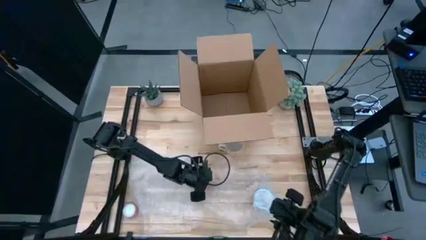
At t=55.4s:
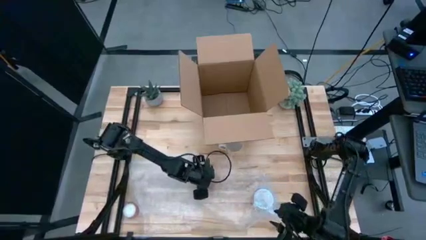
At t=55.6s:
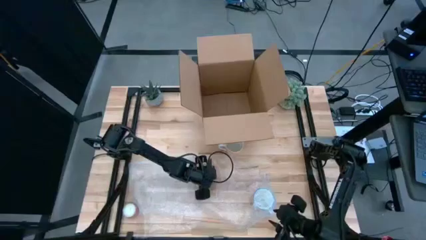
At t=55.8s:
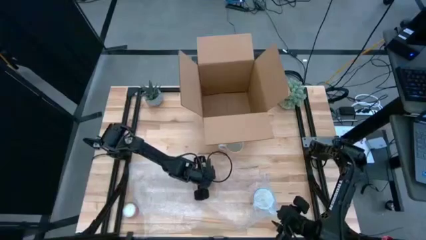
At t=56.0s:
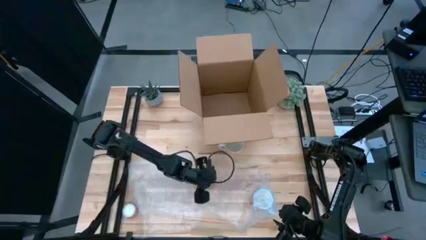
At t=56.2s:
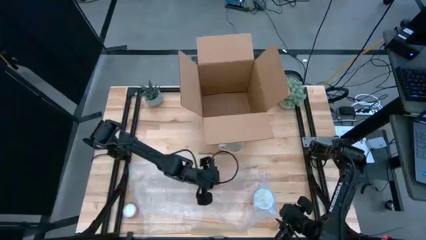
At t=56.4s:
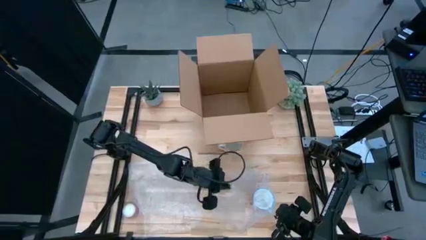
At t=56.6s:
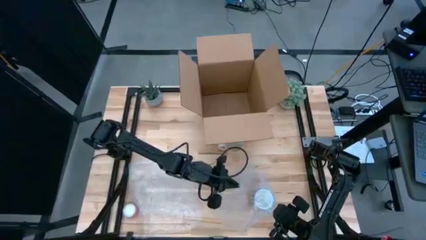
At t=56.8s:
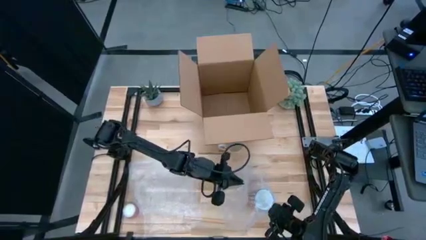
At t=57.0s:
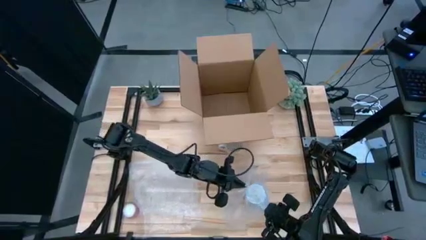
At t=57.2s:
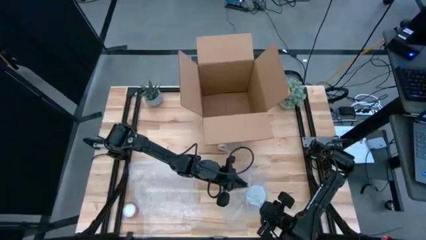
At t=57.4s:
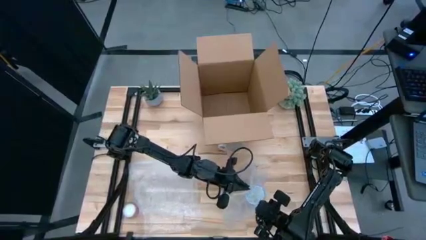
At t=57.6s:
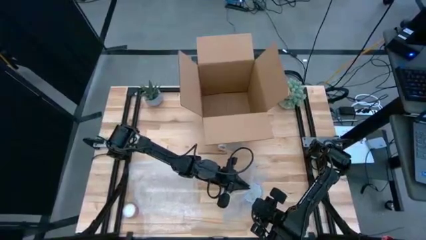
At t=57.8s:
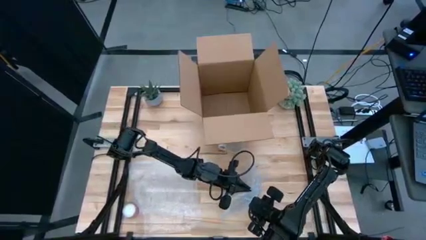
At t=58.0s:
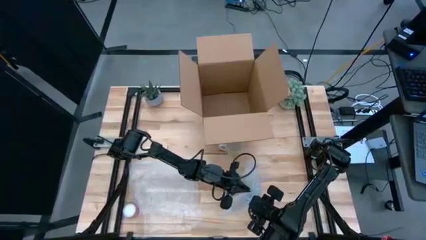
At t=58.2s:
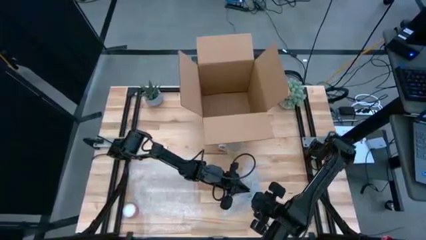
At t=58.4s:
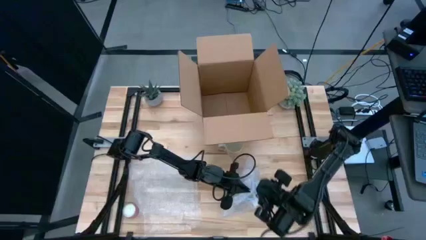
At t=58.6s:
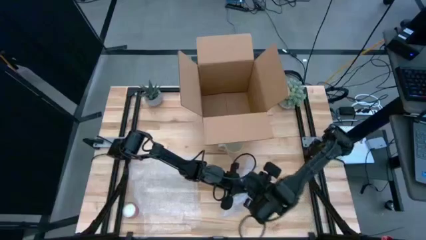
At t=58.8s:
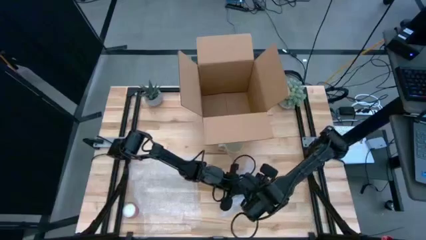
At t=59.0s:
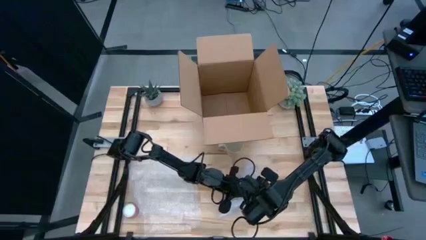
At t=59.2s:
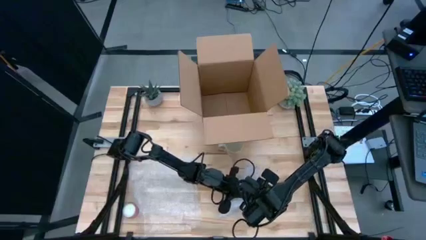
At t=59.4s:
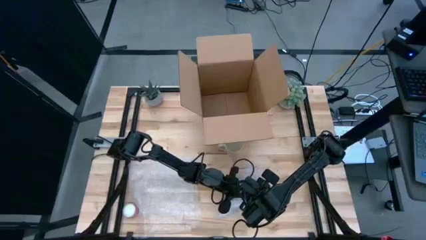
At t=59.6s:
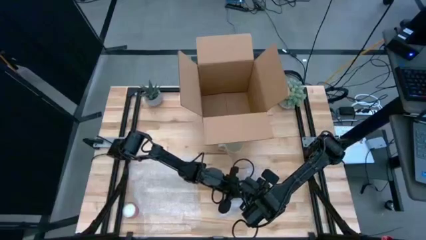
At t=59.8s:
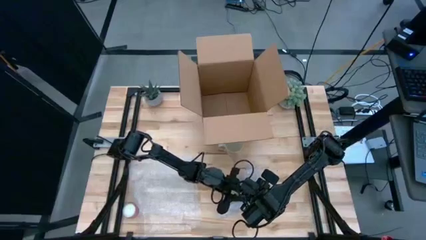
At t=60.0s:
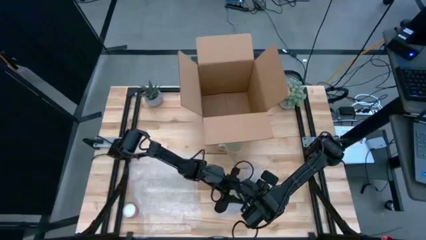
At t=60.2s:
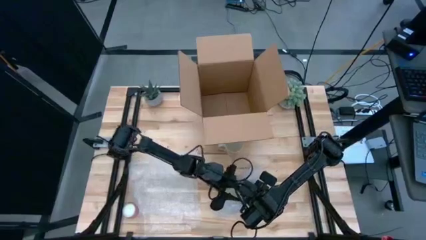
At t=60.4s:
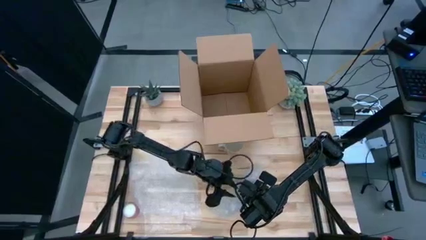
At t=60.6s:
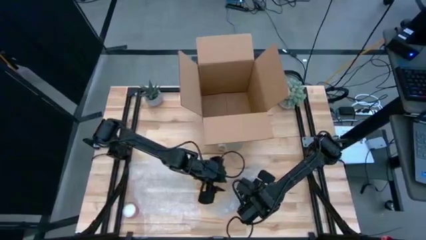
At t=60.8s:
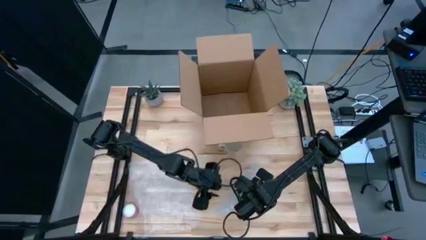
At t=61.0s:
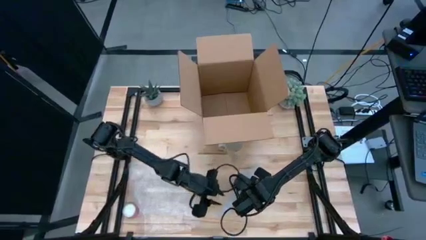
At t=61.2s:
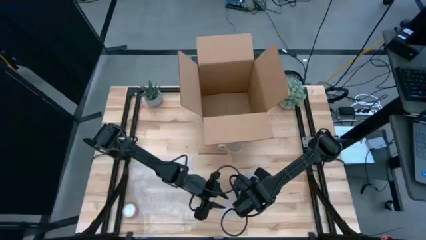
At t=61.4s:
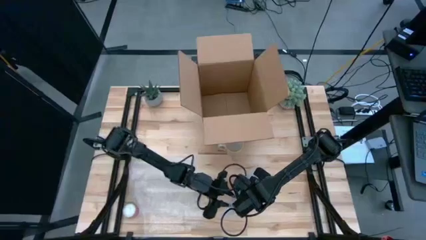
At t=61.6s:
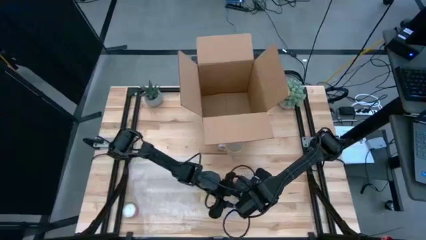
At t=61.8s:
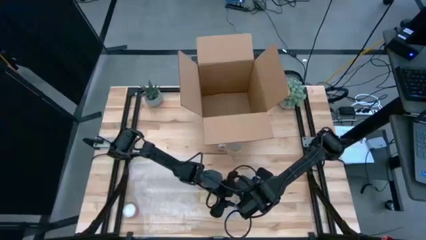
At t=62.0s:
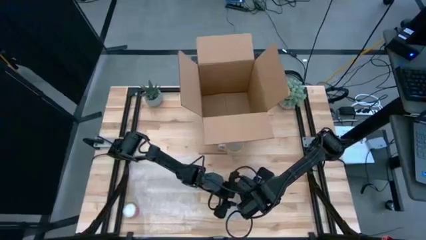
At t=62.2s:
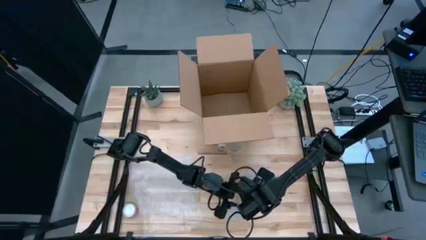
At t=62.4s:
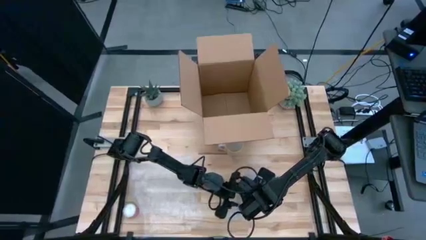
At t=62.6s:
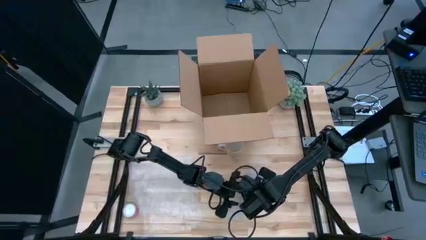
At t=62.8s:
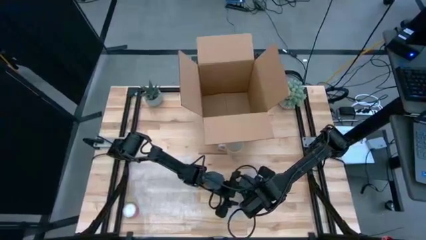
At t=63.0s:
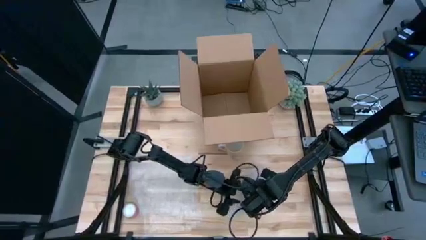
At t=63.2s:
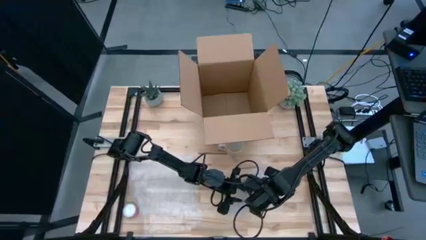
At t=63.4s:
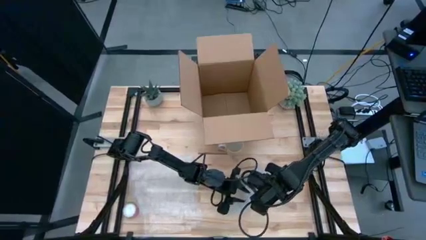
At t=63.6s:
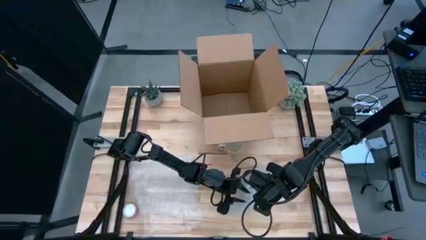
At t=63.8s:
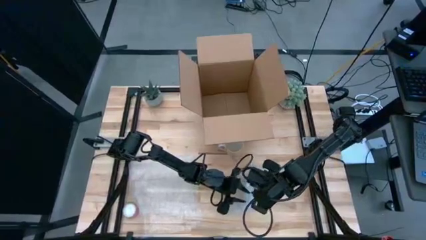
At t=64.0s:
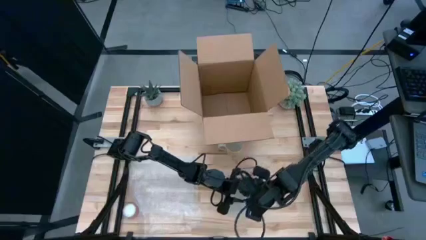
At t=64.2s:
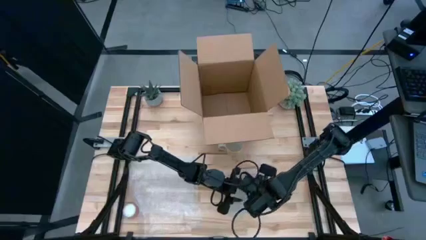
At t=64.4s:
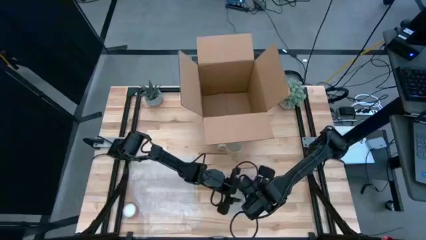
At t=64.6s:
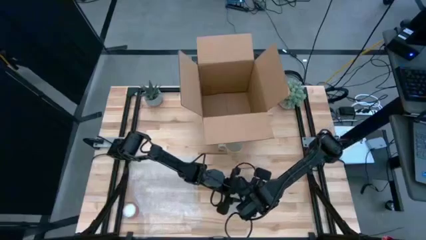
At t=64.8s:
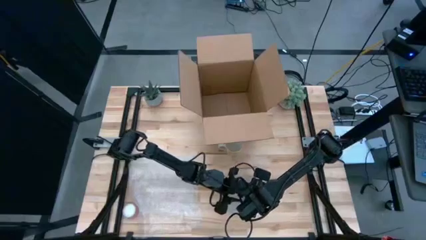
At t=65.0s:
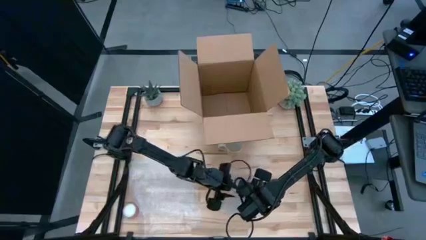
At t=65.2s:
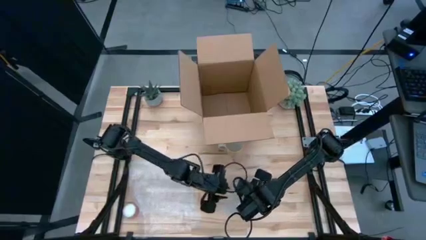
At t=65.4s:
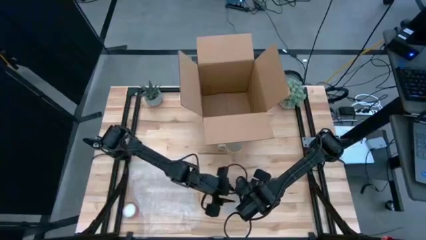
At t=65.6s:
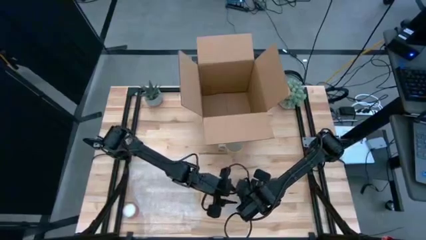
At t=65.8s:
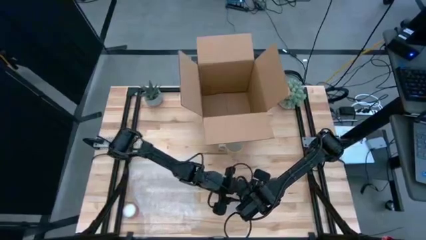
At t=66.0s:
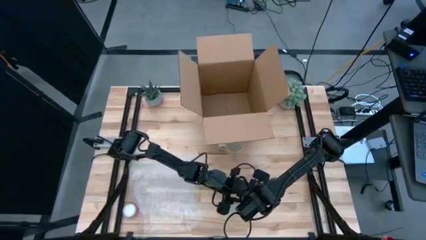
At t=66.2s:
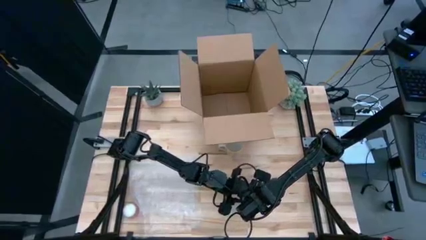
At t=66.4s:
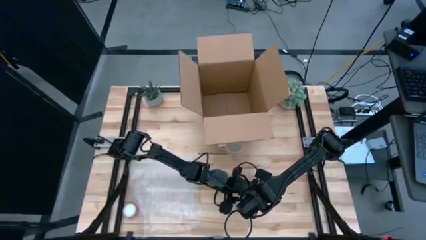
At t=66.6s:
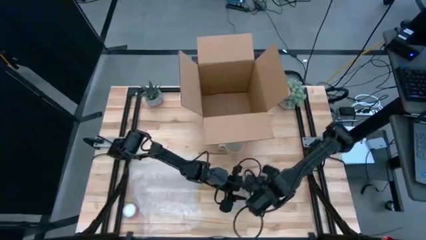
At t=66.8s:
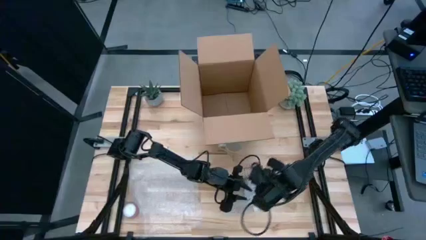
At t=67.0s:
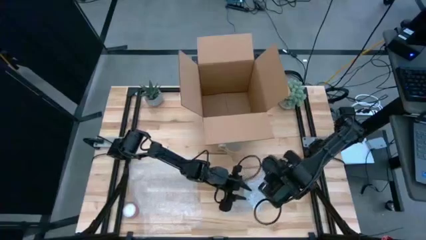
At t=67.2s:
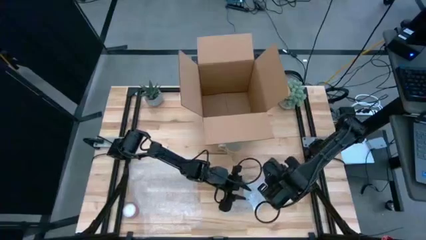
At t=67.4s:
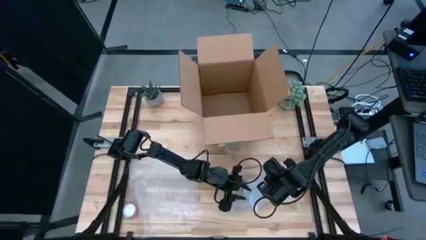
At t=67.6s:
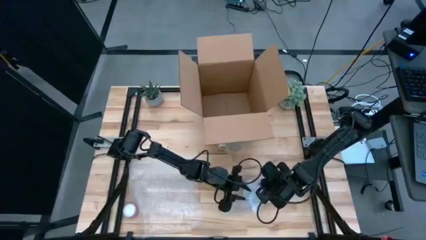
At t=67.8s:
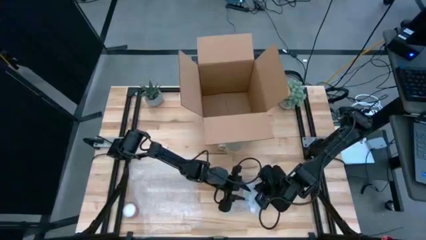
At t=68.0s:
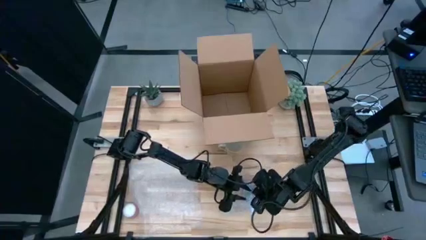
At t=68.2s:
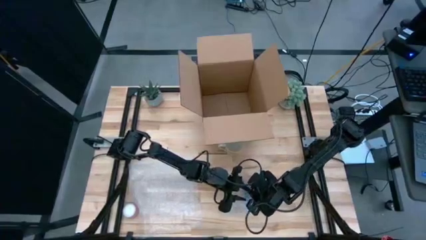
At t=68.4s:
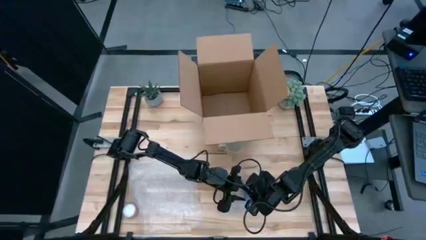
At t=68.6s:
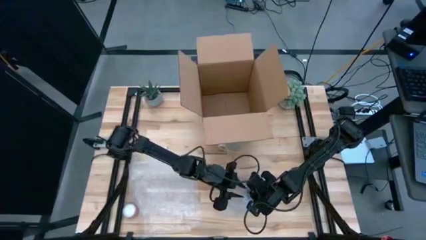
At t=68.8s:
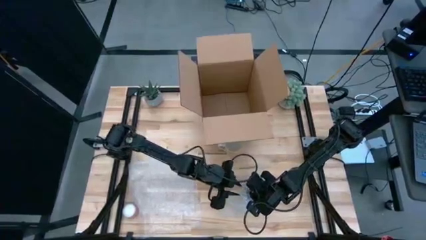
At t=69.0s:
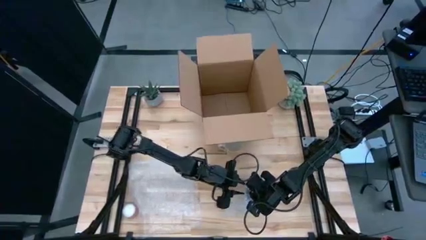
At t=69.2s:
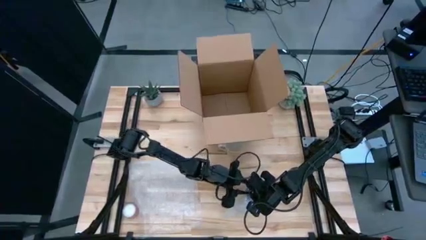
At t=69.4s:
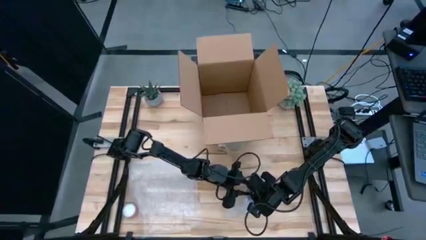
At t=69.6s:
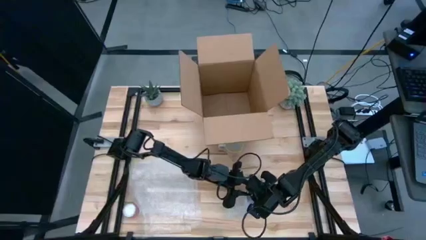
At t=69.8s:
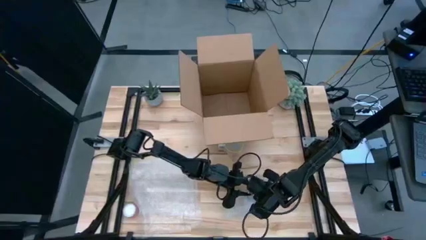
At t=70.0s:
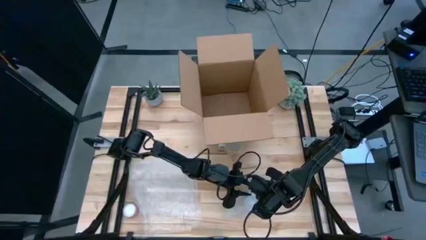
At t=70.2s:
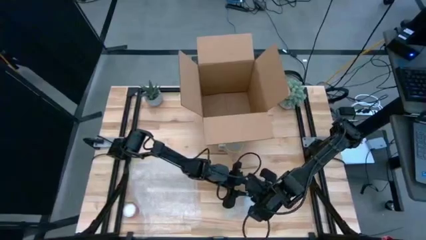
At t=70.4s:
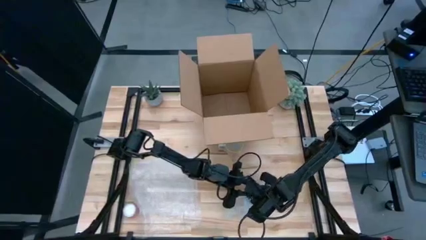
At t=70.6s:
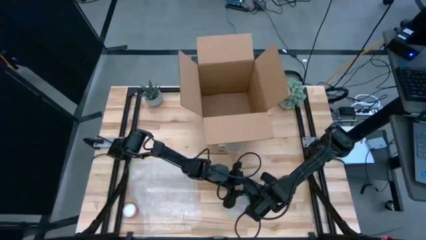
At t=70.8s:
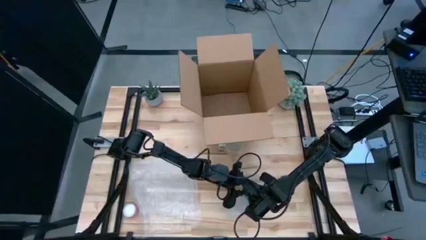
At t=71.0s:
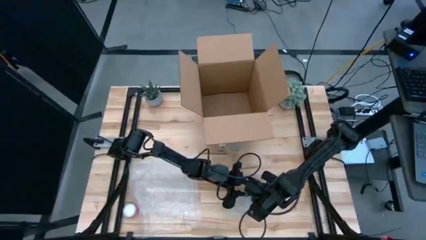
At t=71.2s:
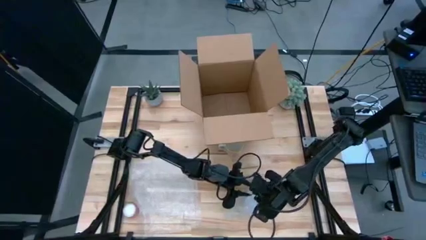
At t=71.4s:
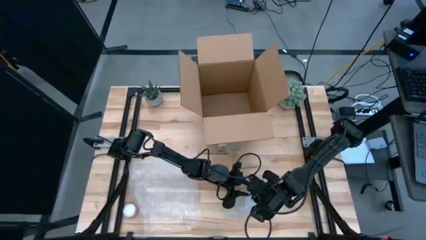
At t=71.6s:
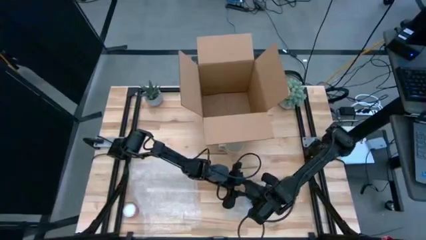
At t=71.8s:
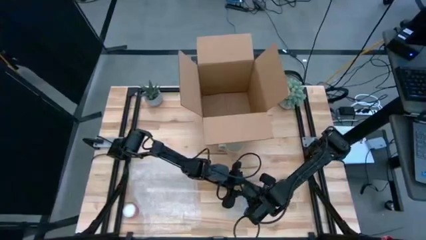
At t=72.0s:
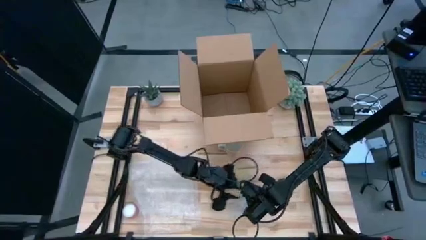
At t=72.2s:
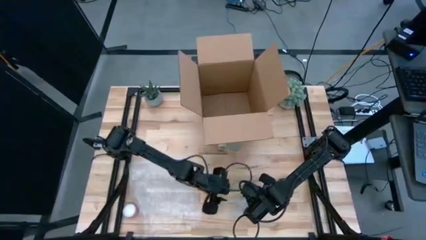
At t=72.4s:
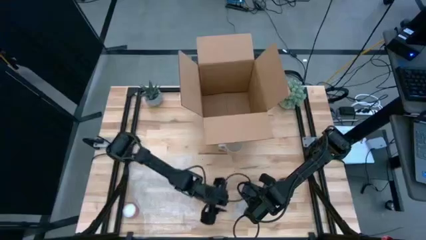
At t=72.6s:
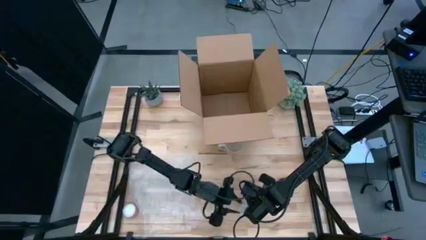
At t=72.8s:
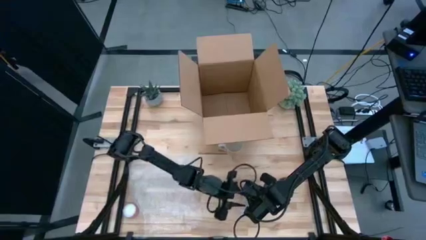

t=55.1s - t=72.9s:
Task: wrap mug
Wrap the red mug with the right transparent bubble wrap
